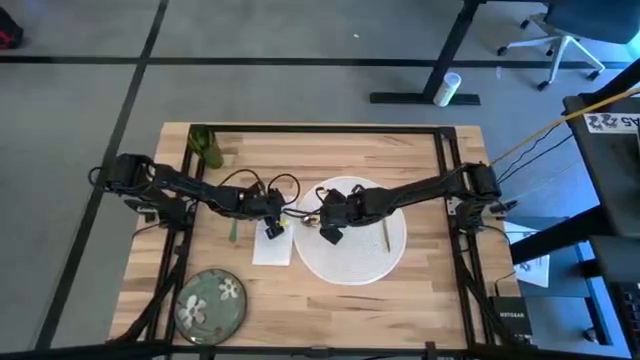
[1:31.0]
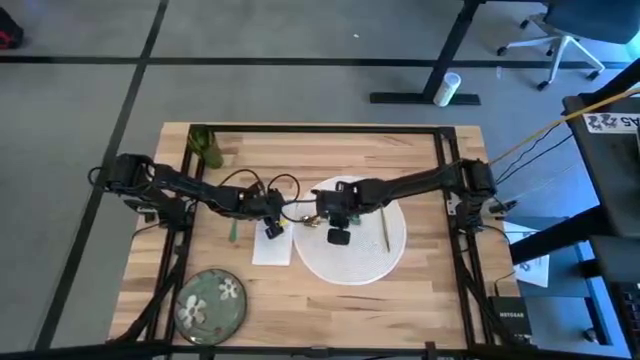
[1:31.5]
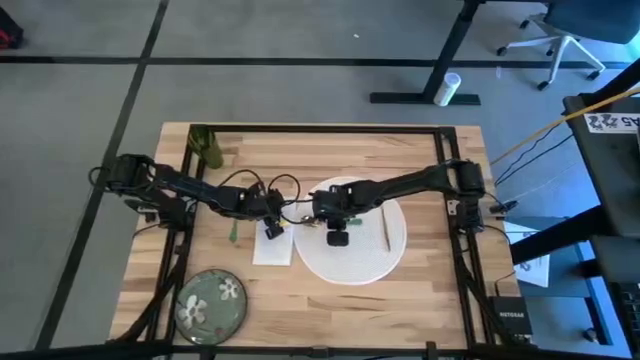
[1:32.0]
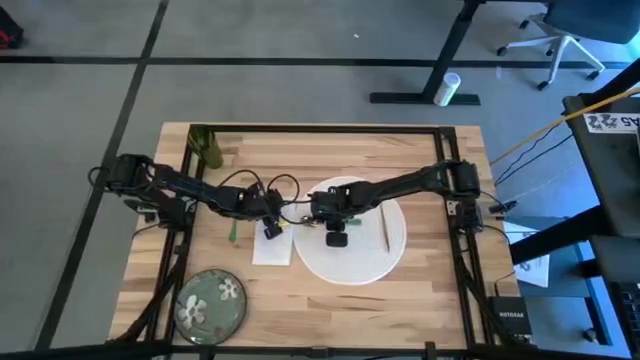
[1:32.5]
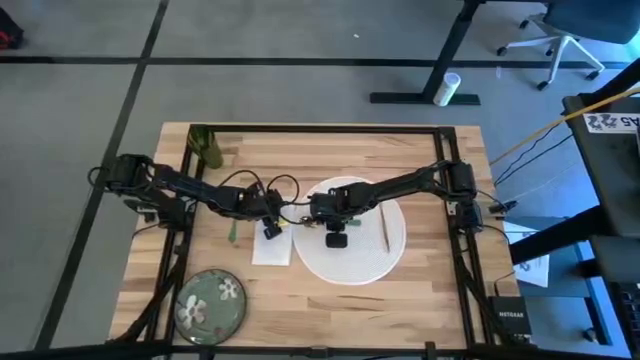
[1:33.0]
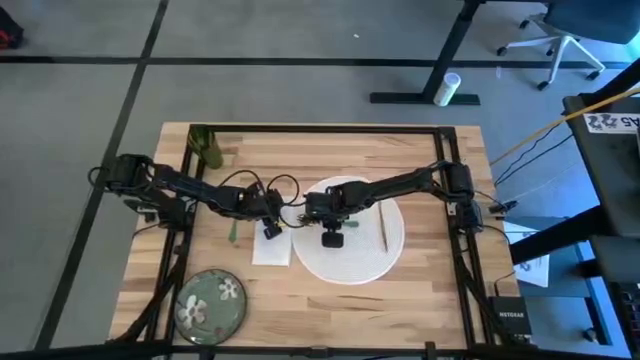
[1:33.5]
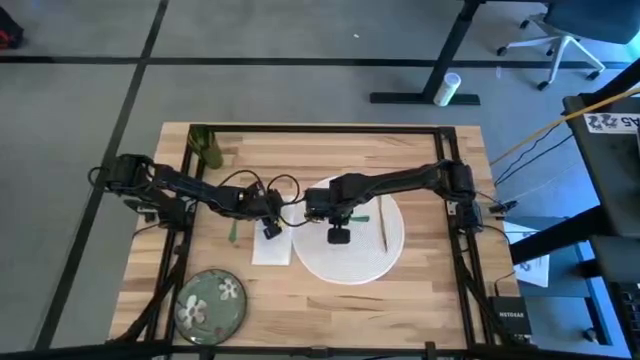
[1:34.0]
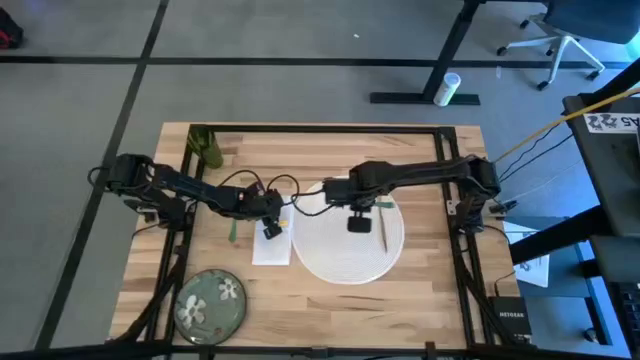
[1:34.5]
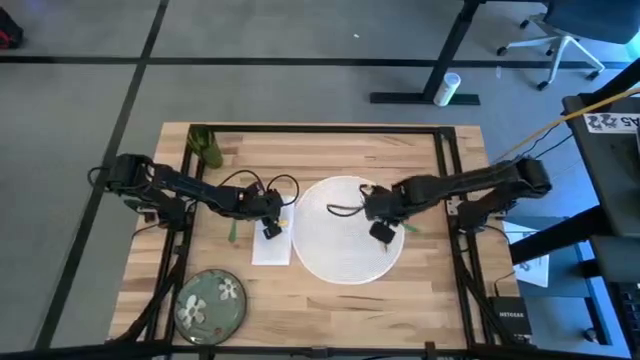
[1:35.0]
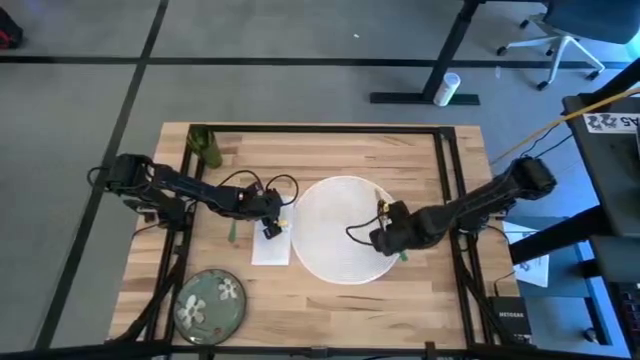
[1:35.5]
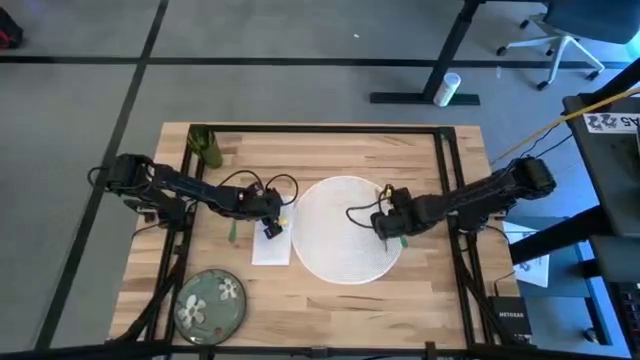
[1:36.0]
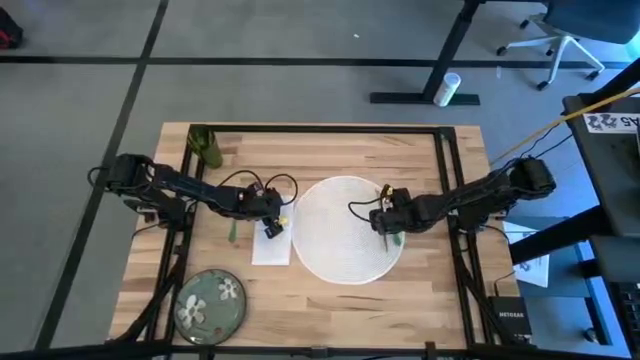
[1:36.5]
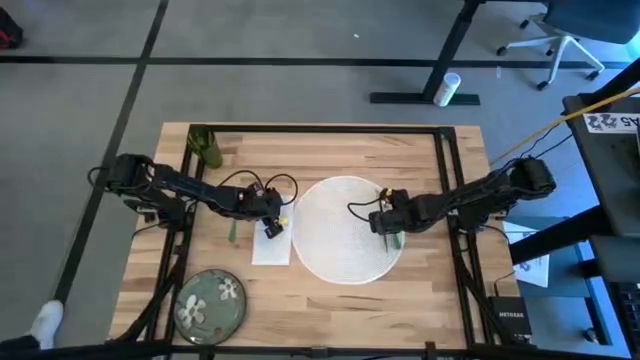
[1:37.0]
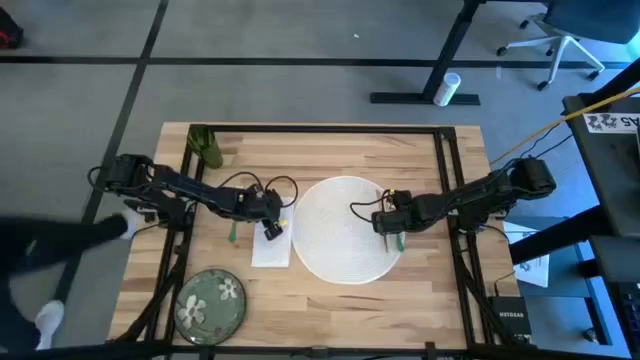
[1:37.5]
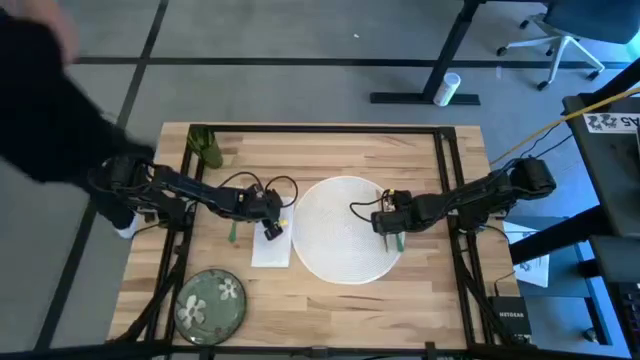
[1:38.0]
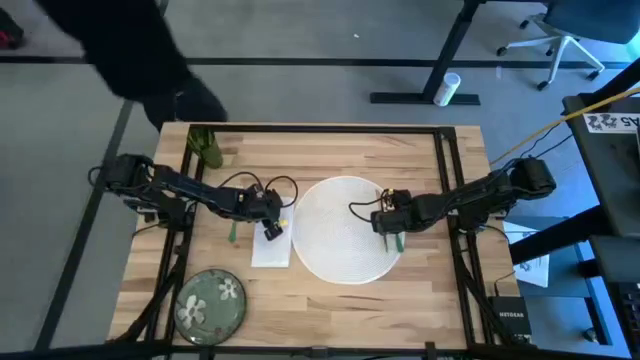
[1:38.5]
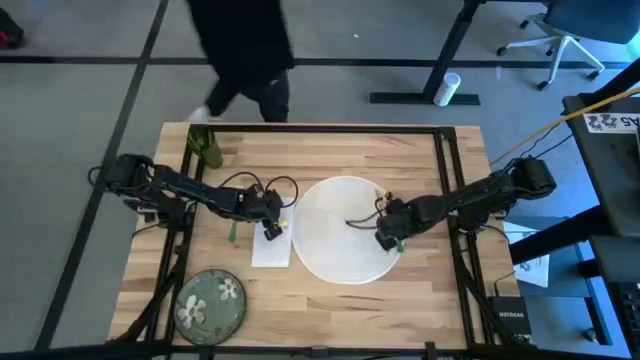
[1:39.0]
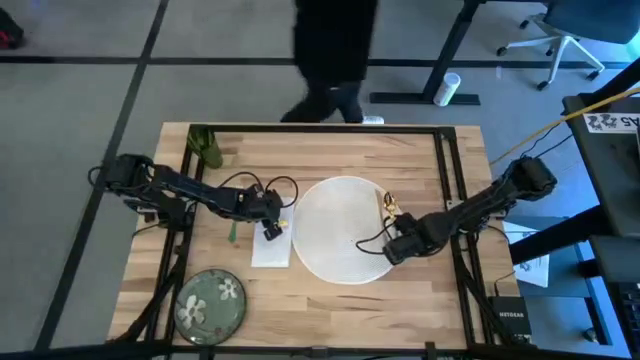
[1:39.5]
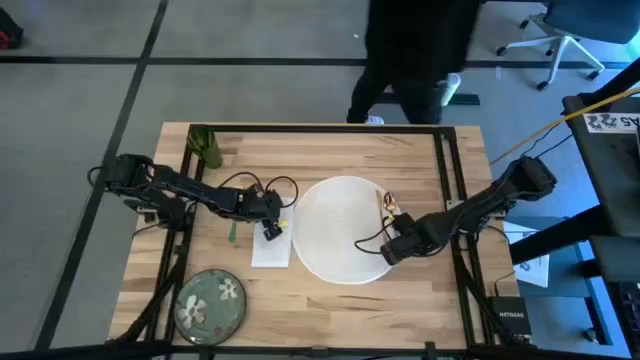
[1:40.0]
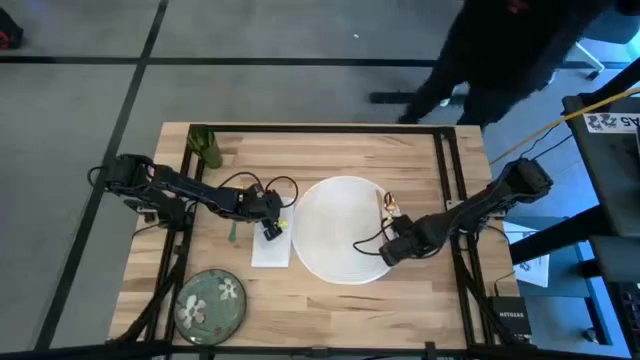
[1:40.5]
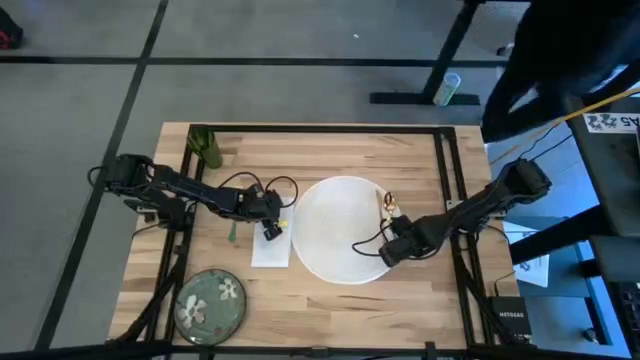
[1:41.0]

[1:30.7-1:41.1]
Task: Set table place
Put the green spoon on the white table mat to right of the gold table knife

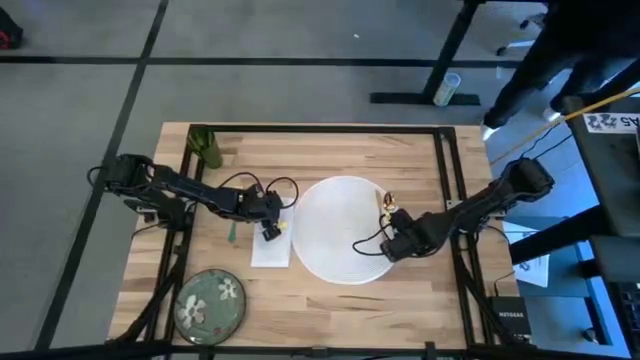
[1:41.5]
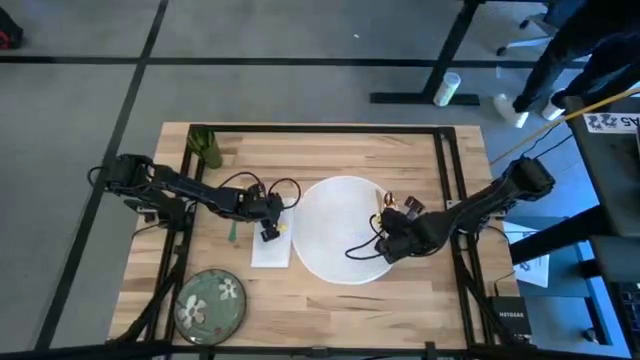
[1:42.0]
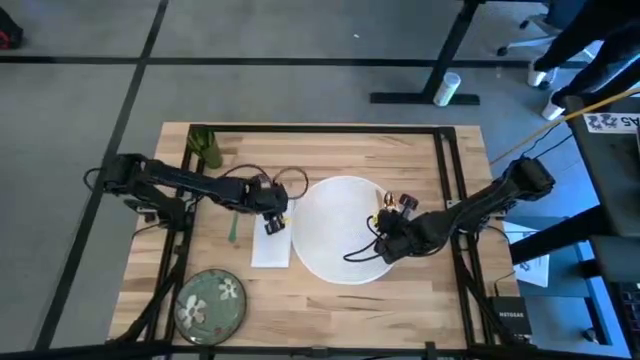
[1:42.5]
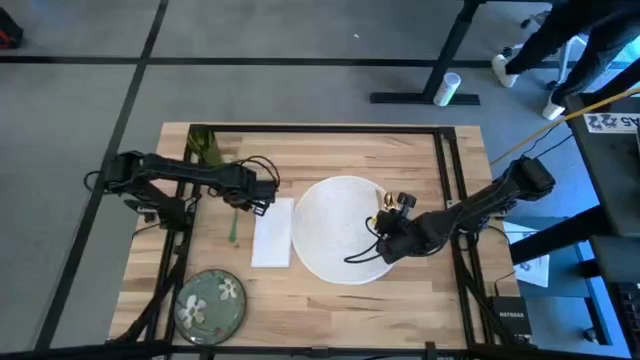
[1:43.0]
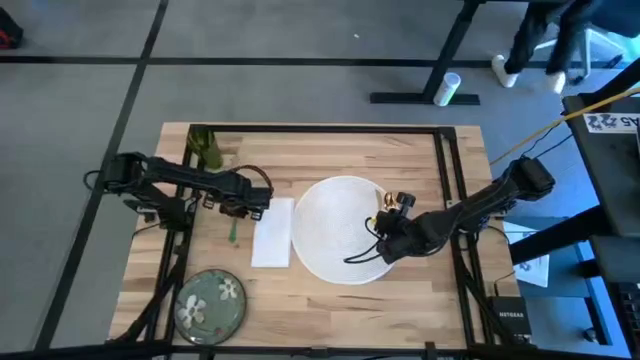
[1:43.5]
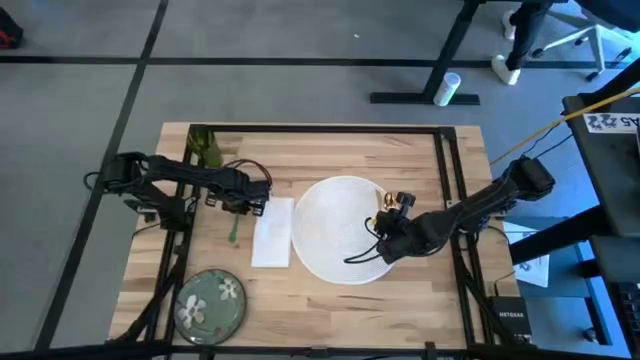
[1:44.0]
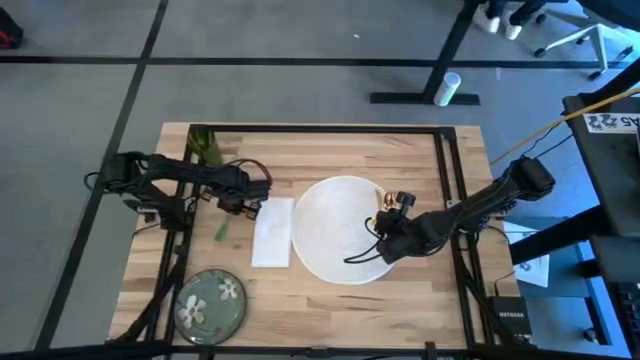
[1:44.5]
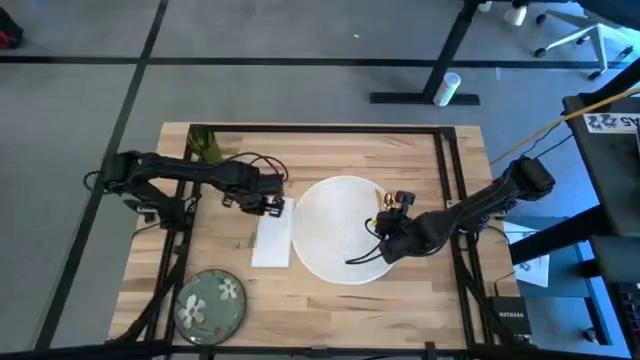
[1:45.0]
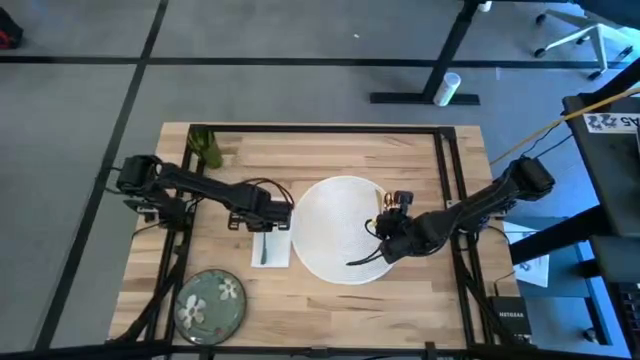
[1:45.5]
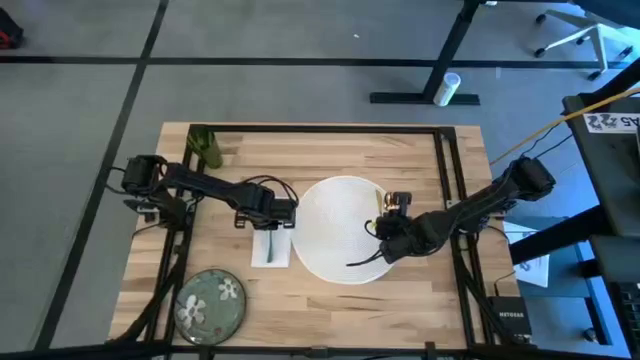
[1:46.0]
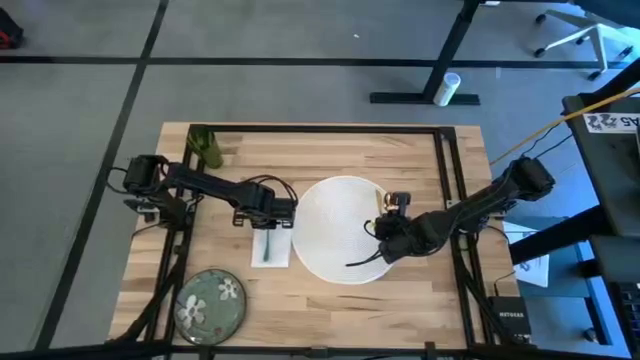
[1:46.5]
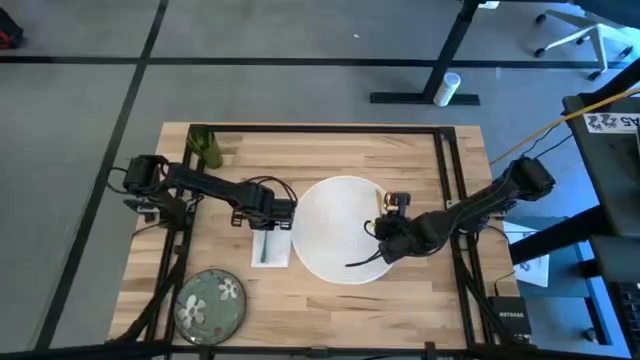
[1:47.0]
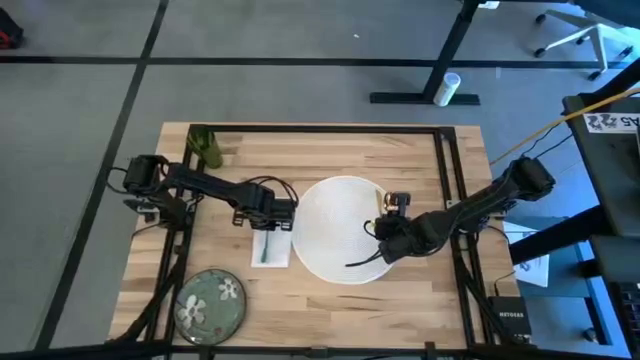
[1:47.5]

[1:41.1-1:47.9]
Put the green fork on the white table napkin

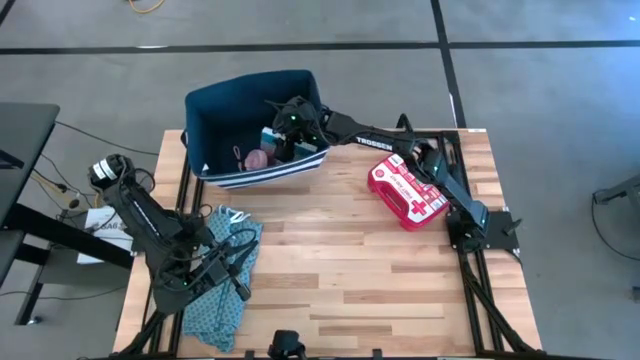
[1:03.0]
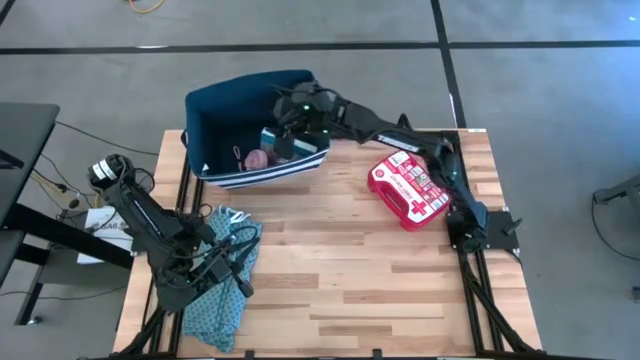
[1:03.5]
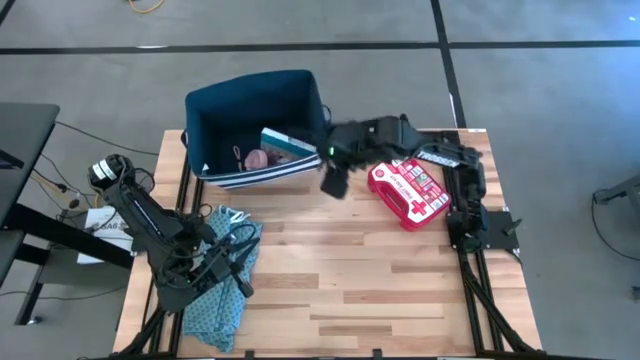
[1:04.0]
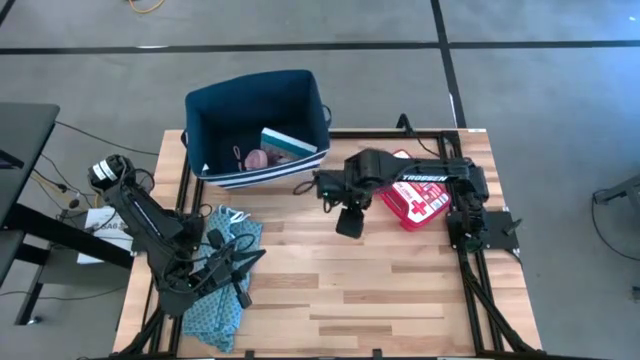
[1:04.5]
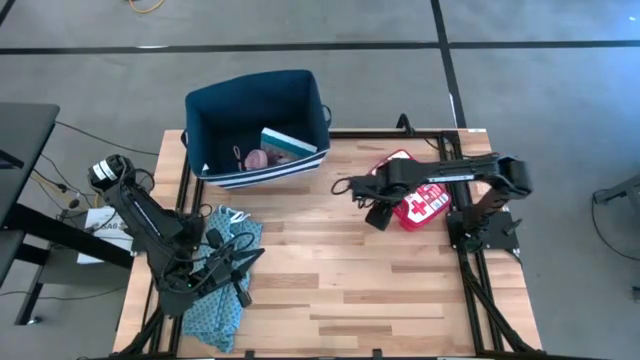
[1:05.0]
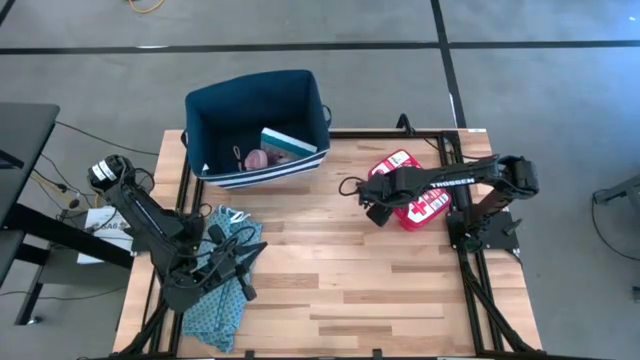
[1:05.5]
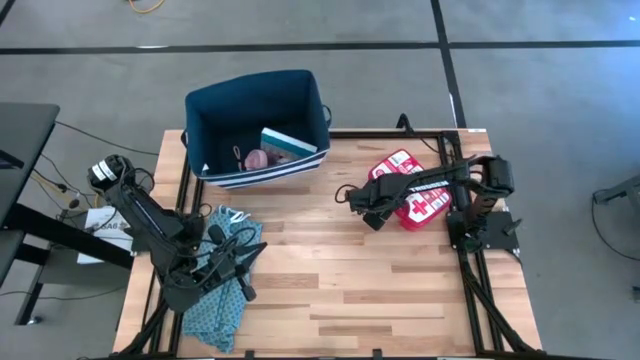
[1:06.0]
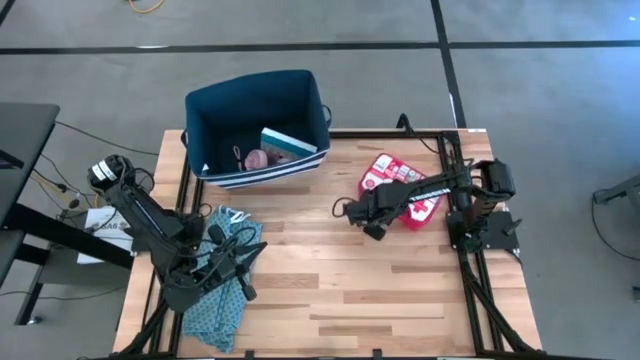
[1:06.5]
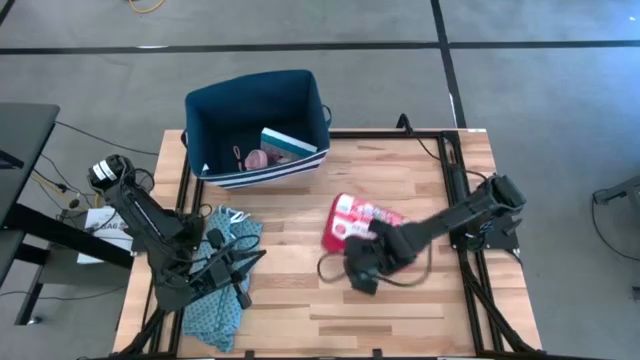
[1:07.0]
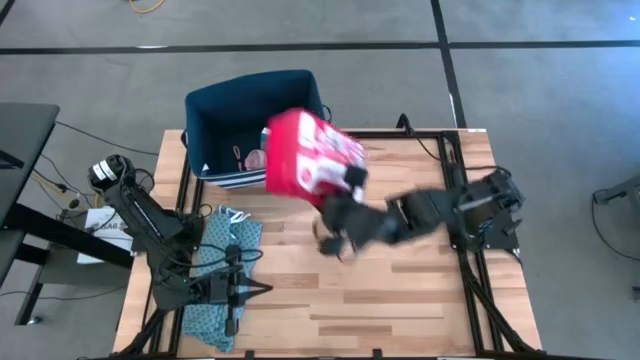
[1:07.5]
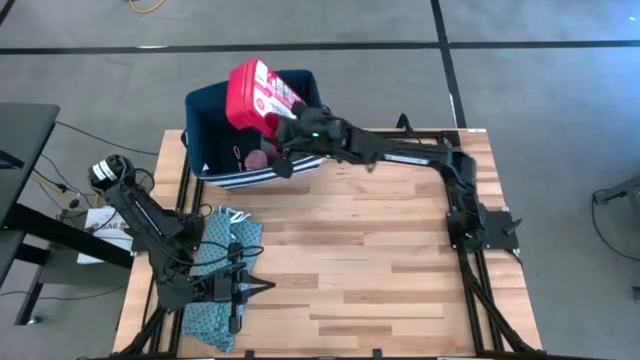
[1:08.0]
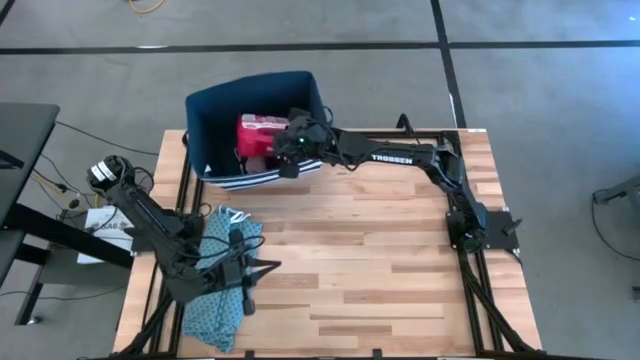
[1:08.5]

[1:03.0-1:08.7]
Task: Pick & place medical supplies in basket/bin
Put the red first aid kit box into theblue bin
